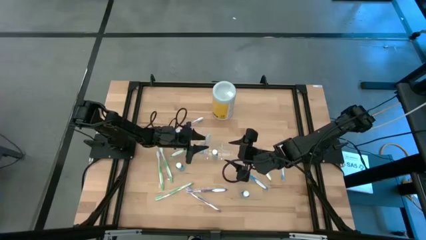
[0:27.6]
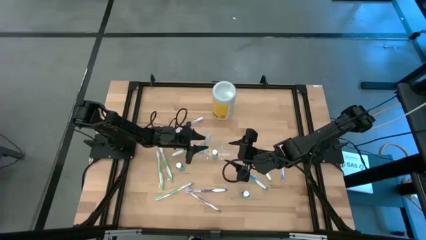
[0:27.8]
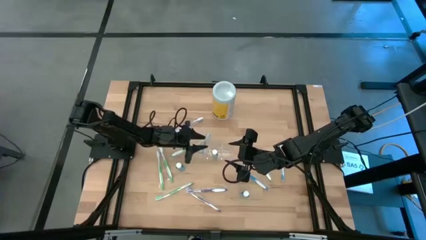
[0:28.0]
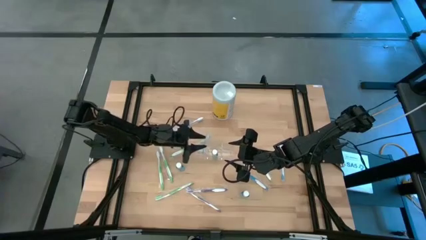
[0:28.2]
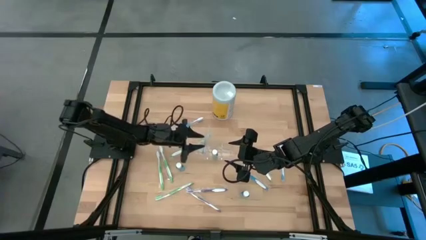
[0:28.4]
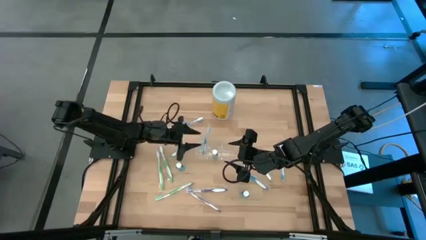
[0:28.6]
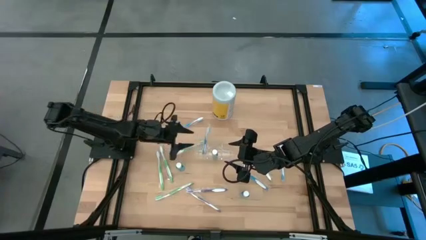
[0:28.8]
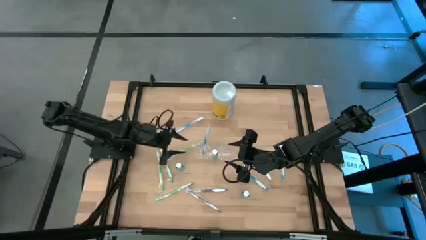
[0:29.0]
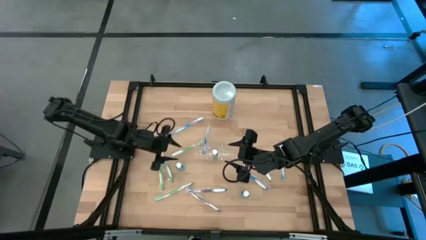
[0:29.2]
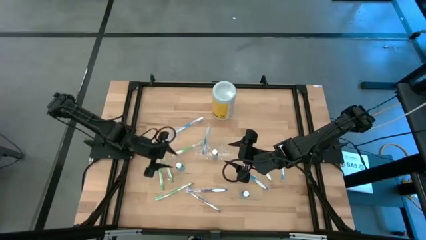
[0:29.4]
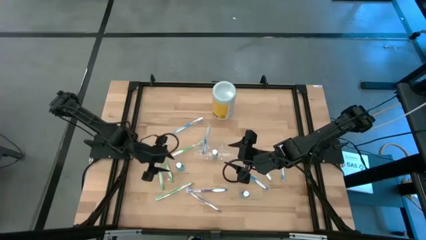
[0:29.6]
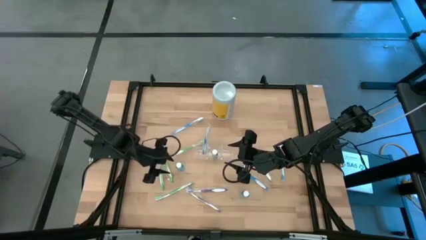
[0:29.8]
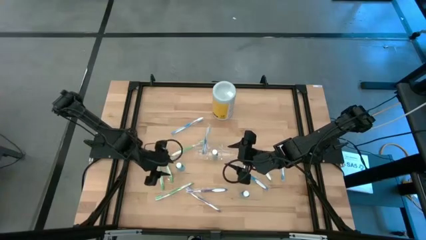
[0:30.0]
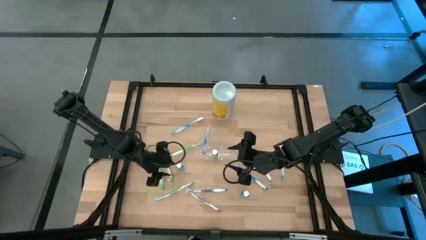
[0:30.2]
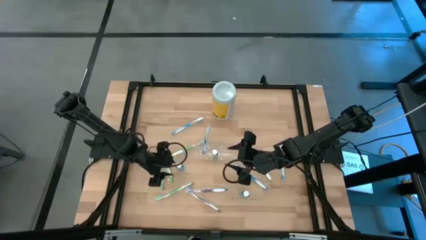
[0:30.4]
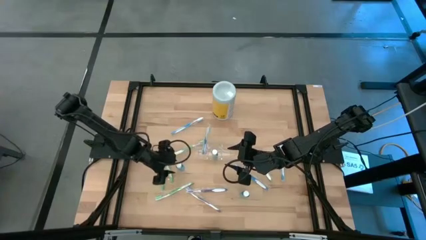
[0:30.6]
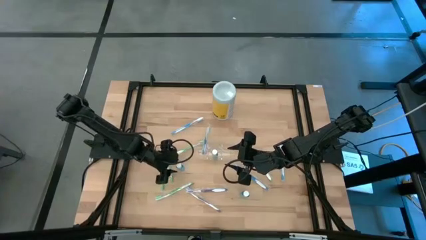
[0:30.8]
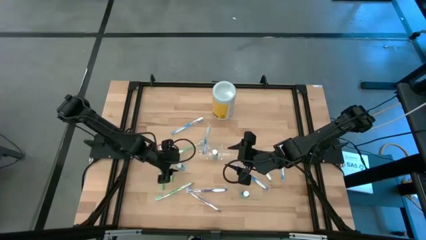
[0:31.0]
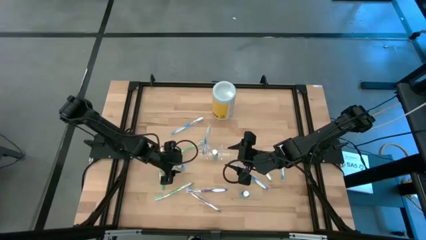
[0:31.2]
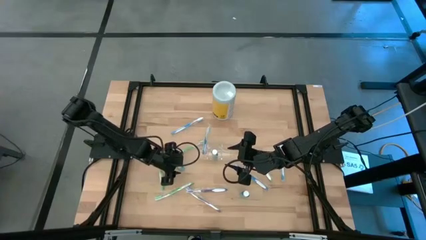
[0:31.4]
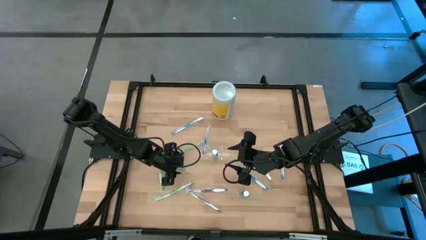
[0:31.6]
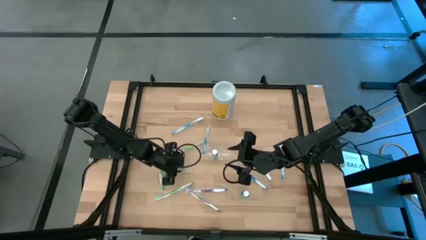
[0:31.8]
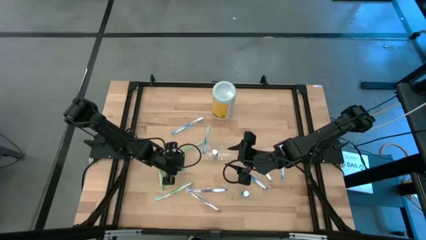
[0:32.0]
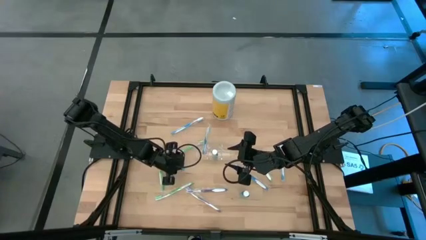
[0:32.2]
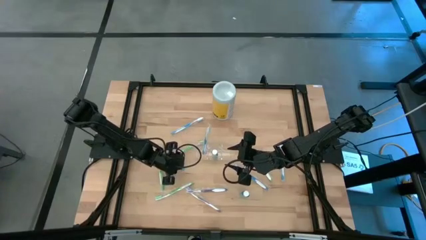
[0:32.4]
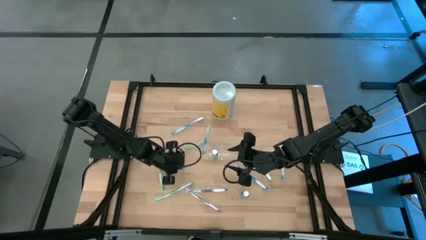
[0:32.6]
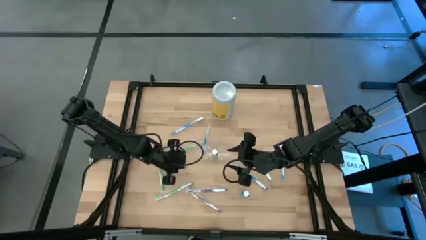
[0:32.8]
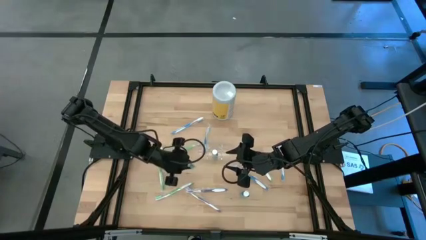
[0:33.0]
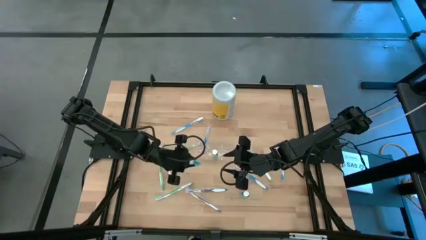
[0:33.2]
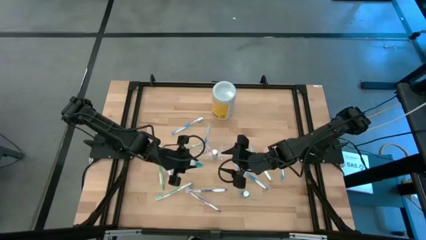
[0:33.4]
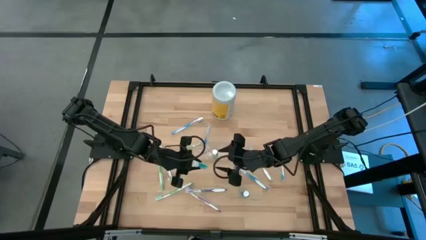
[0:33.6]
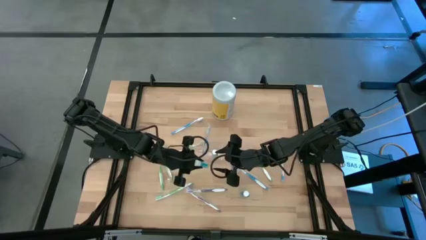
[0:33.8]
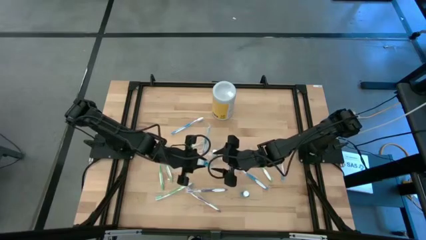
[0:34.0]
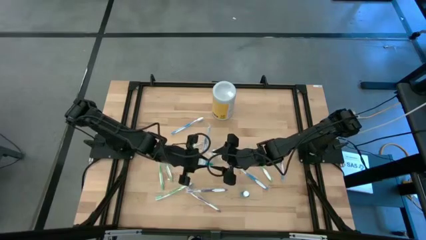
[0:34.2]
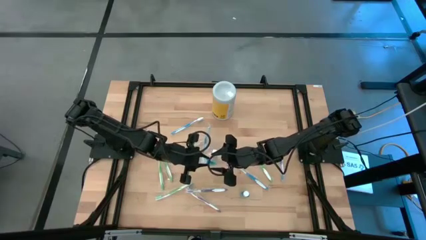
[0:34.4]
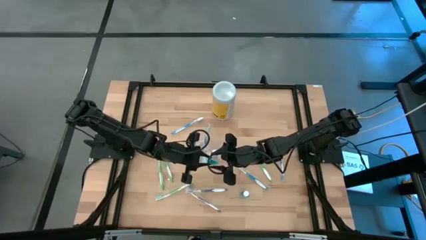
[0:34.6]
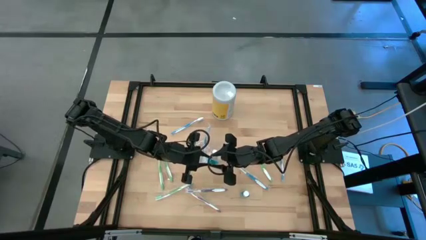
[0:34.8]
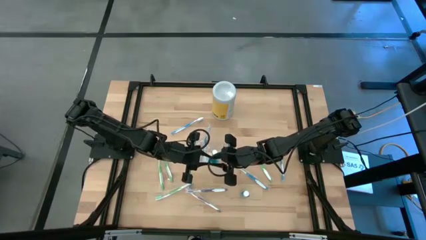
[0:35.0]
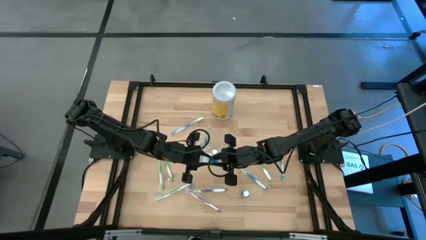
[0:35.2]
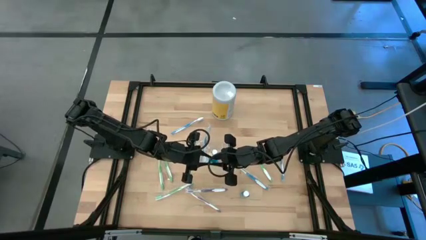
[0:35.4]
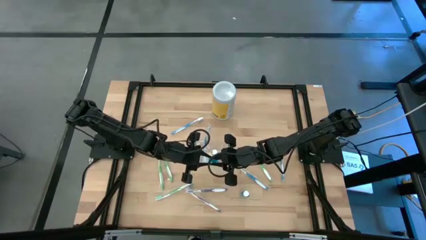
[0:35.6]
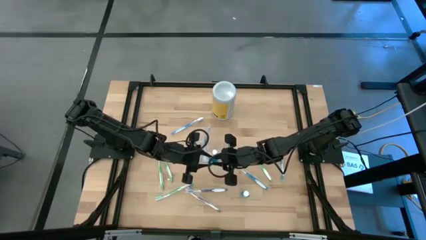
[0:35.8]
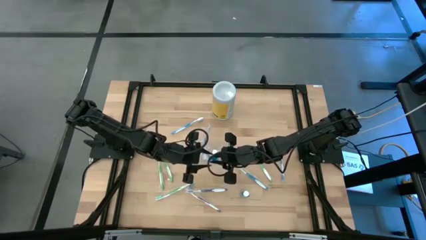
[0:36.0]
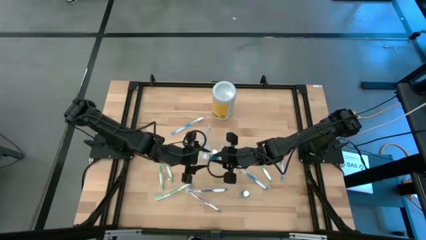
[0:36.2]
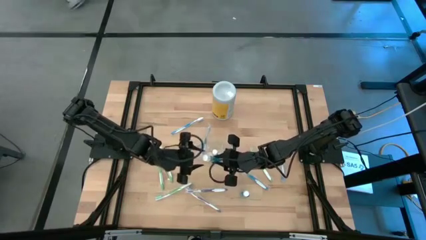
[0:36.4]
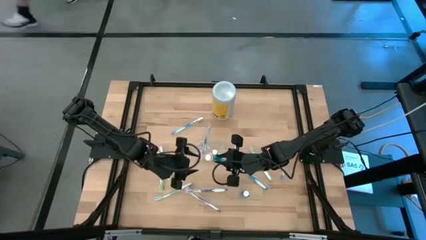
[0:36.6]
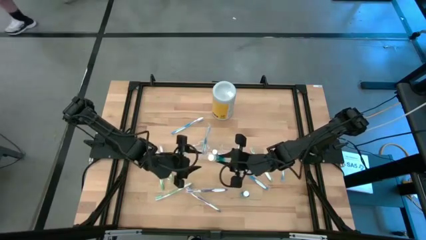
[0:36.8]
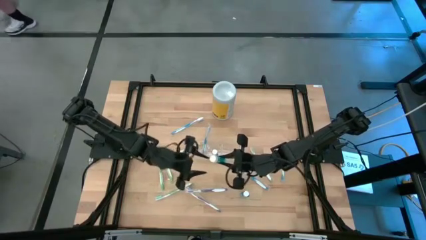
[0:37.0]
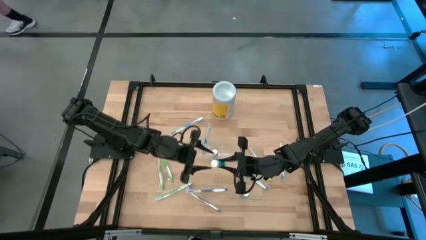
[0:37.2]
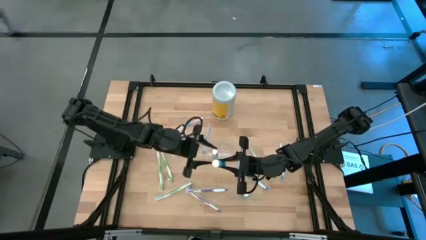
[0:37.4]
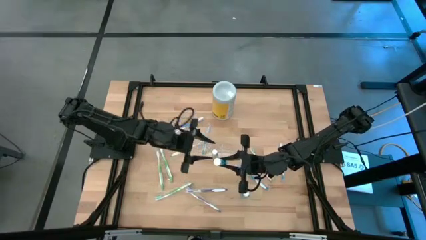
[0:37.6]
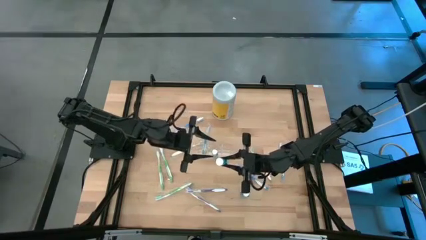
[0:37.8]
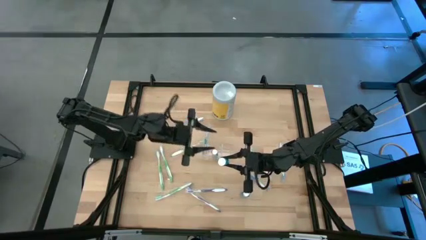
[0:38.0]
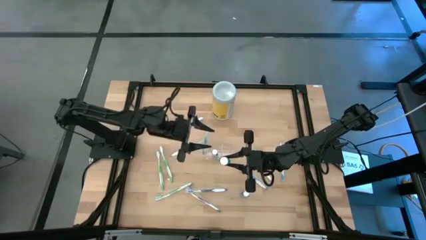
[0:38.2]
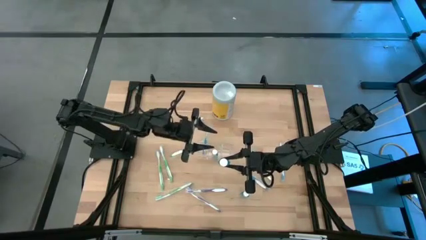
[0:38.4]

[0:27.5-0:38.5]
Task: Pick & Place toothbrushing station
Put the blue mouthwash into the transparent organizer
